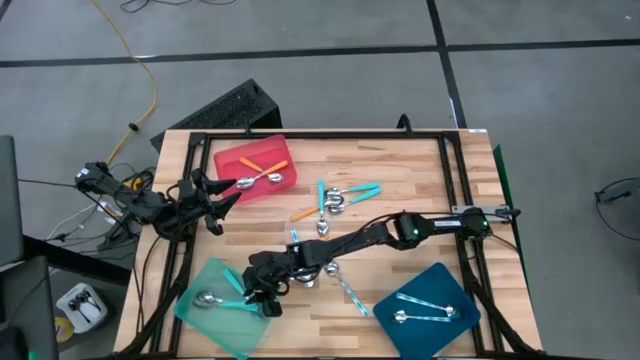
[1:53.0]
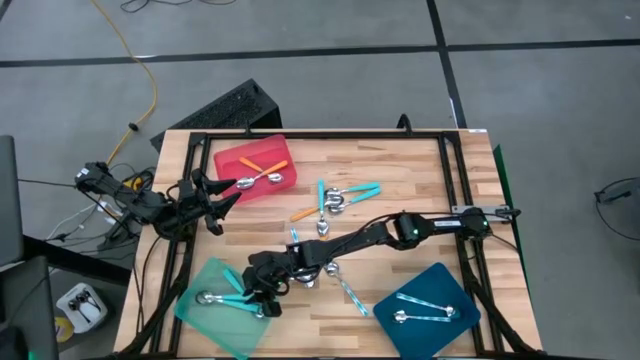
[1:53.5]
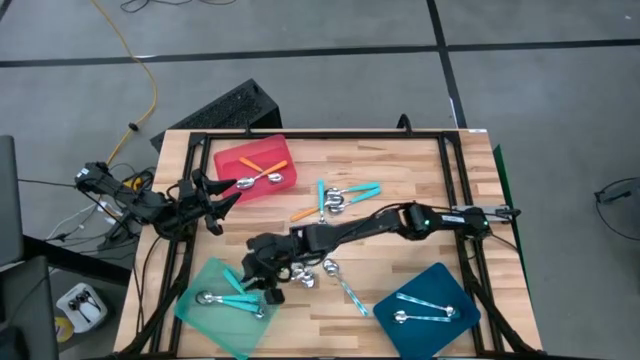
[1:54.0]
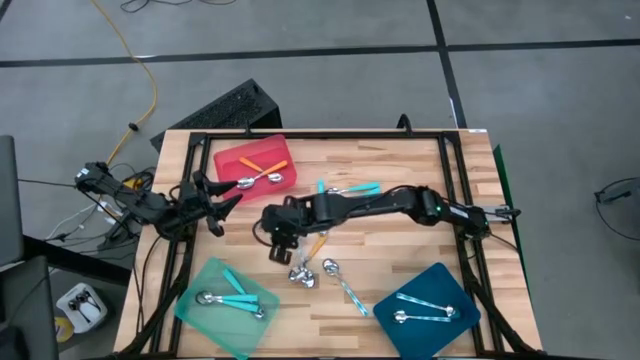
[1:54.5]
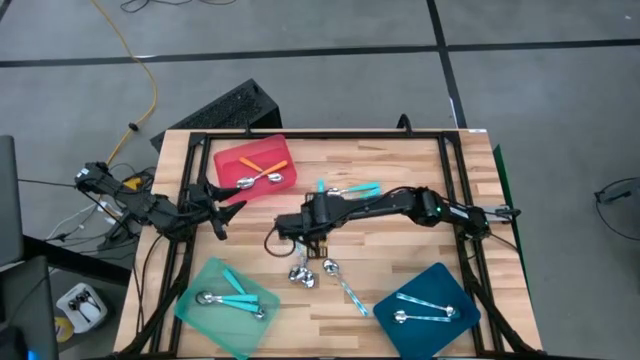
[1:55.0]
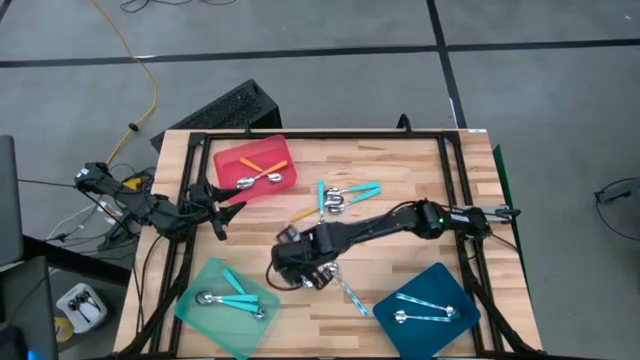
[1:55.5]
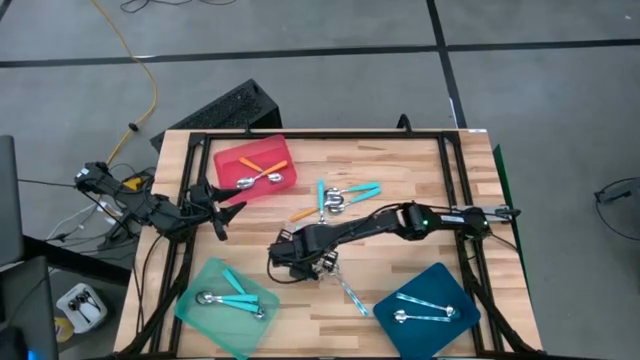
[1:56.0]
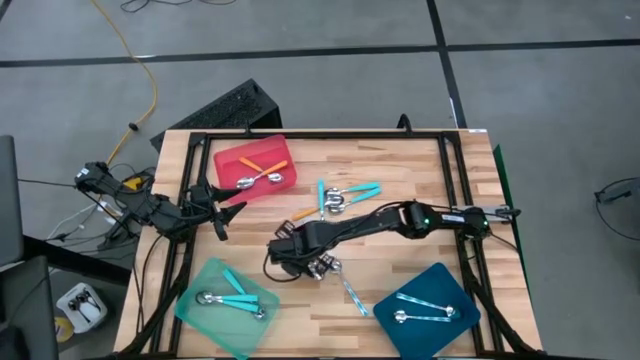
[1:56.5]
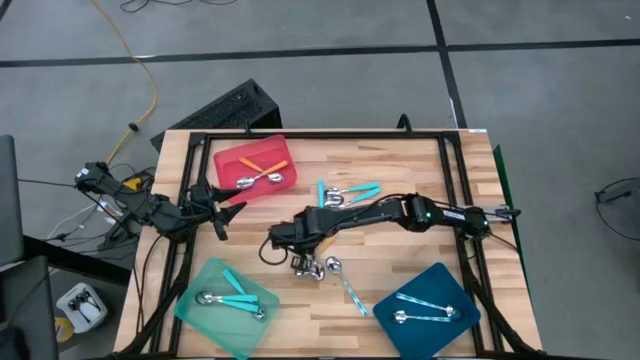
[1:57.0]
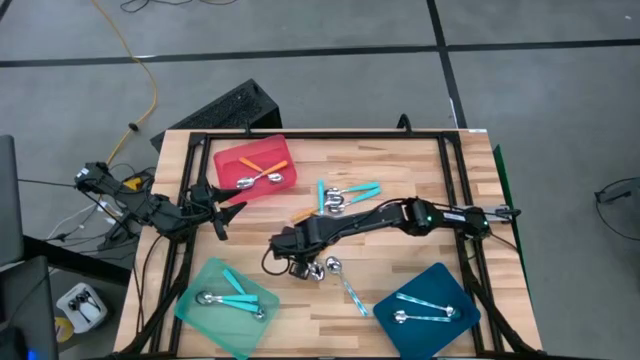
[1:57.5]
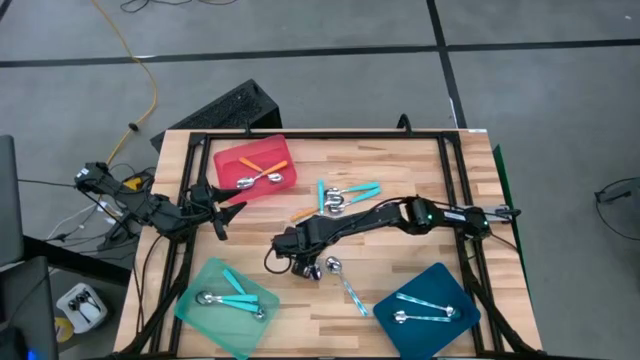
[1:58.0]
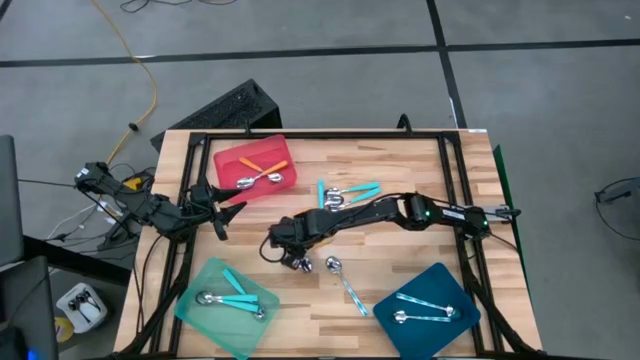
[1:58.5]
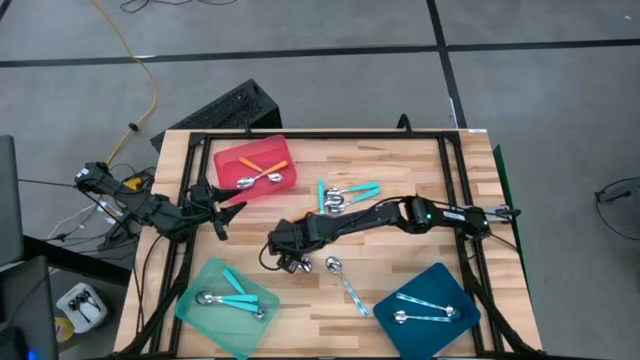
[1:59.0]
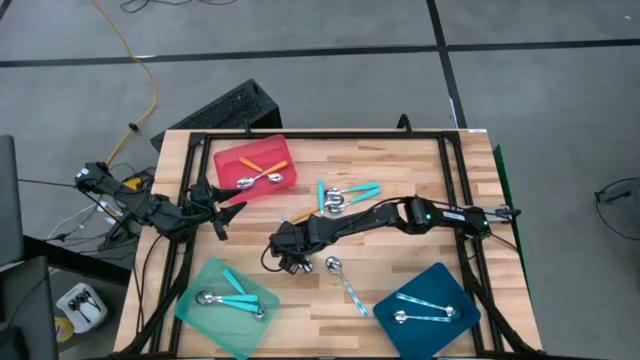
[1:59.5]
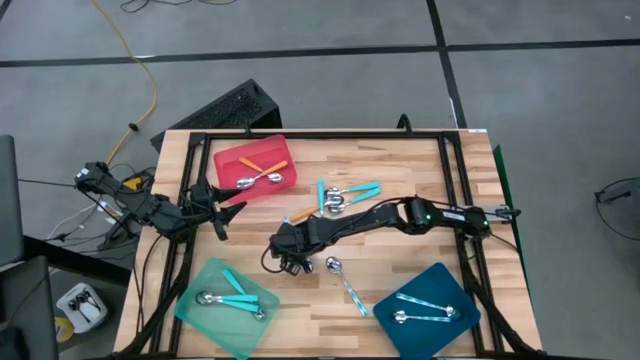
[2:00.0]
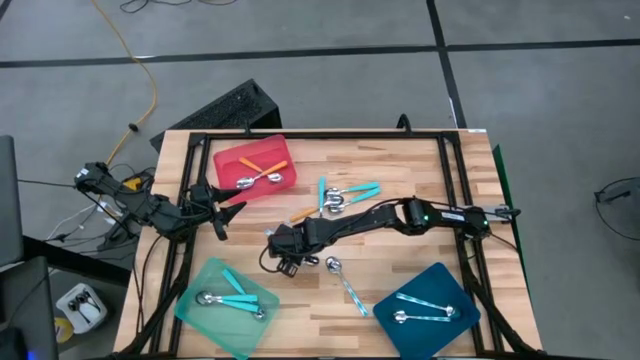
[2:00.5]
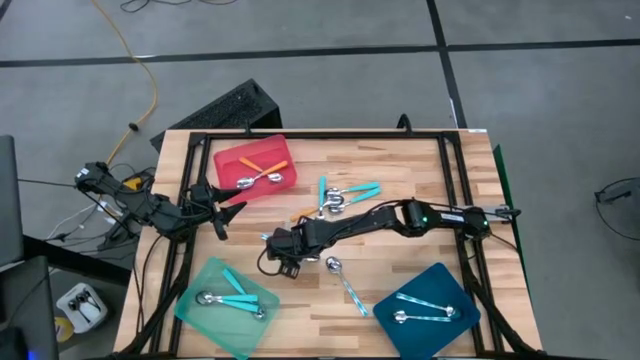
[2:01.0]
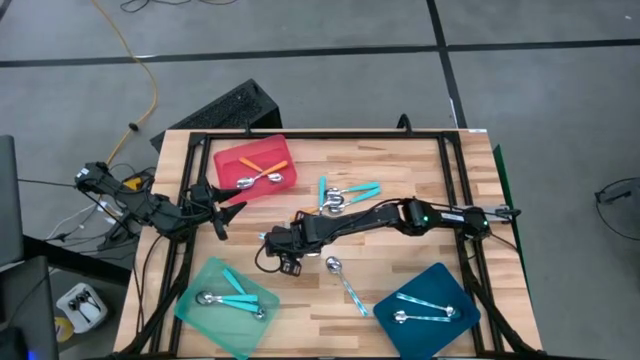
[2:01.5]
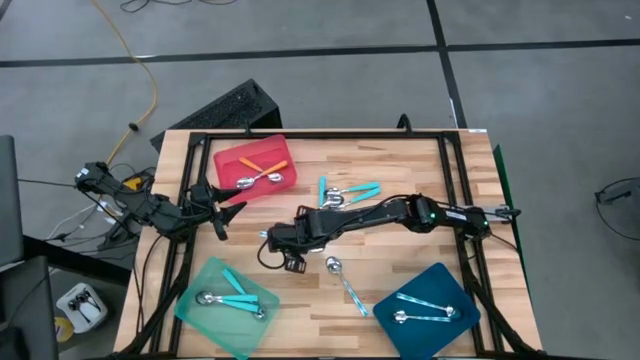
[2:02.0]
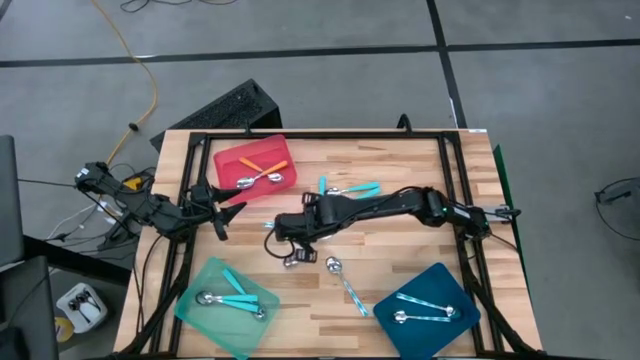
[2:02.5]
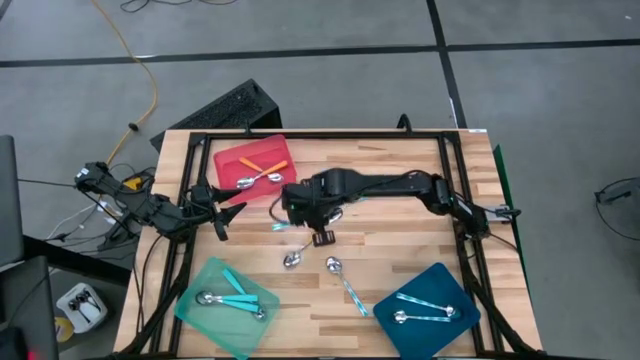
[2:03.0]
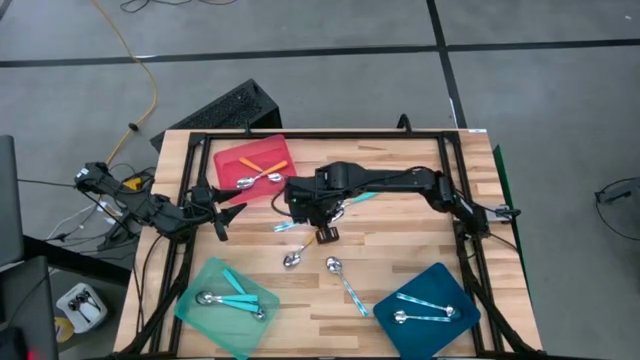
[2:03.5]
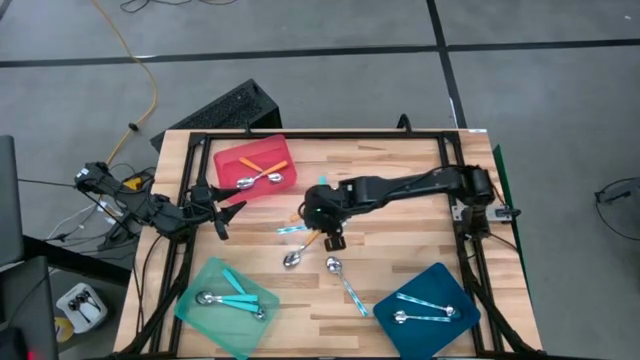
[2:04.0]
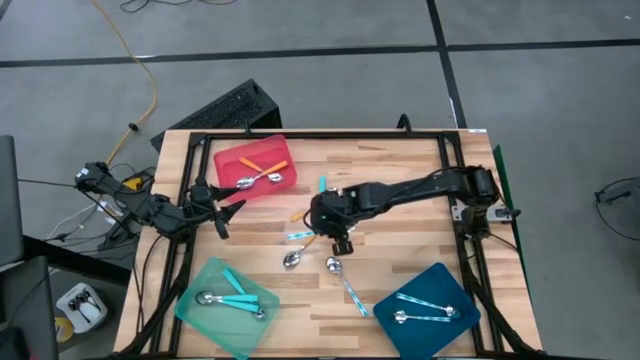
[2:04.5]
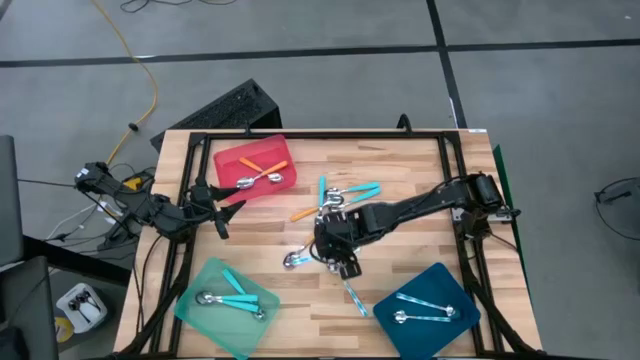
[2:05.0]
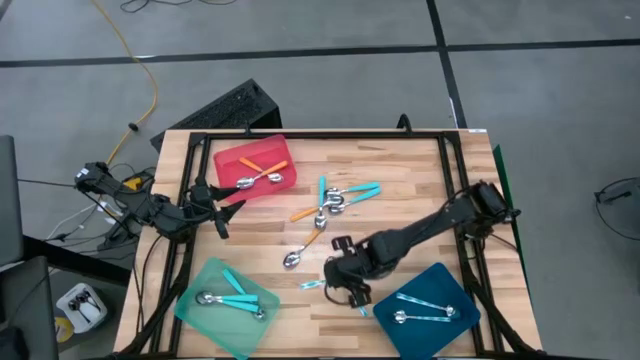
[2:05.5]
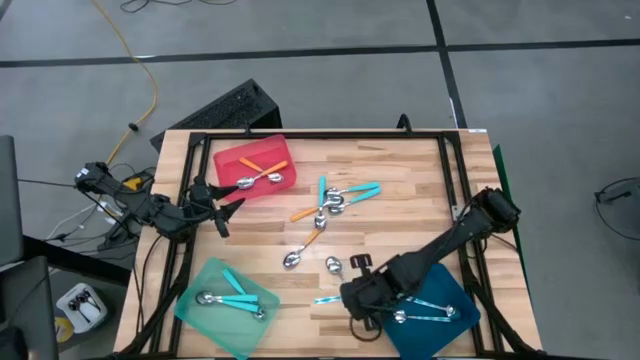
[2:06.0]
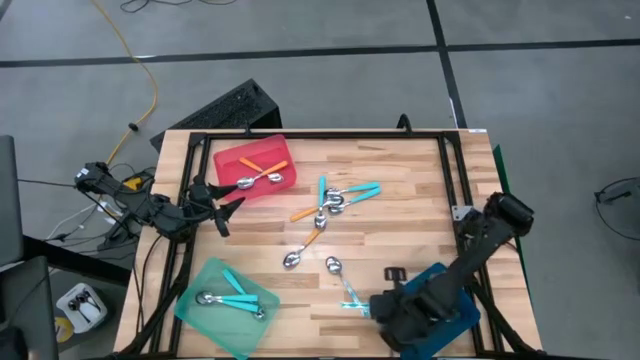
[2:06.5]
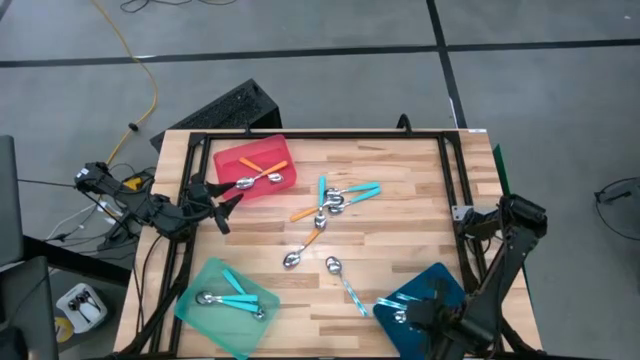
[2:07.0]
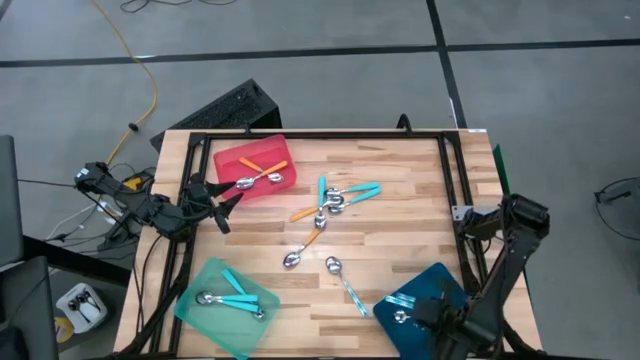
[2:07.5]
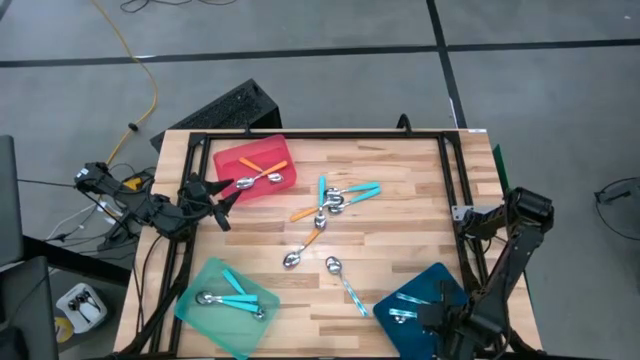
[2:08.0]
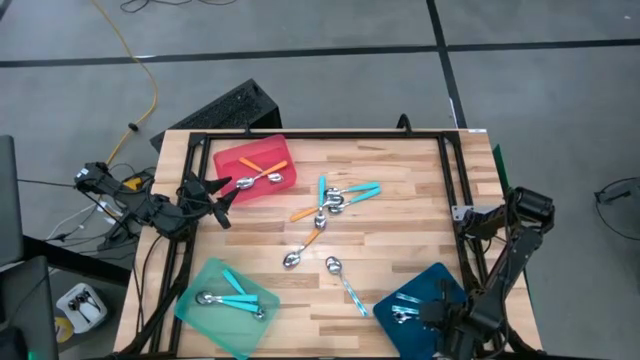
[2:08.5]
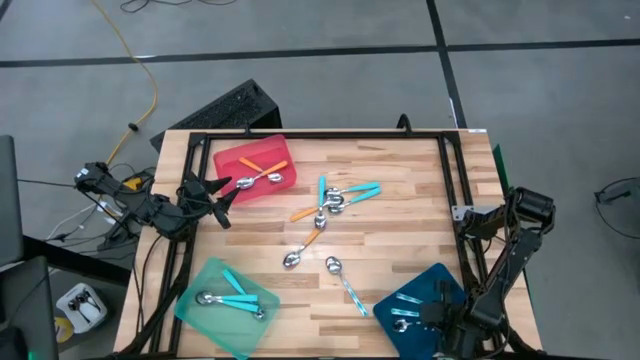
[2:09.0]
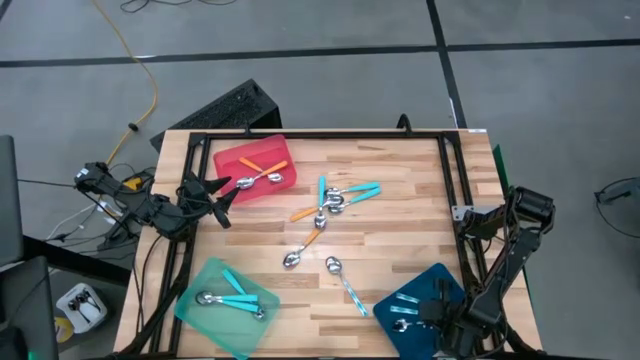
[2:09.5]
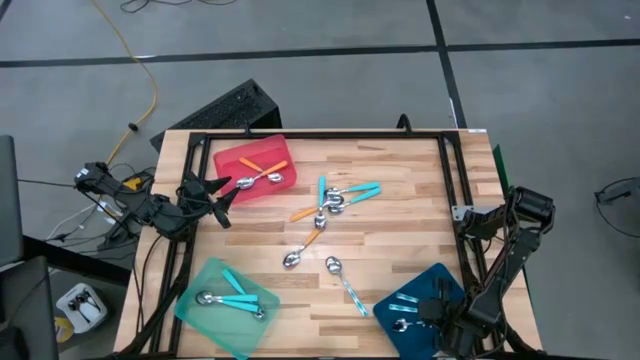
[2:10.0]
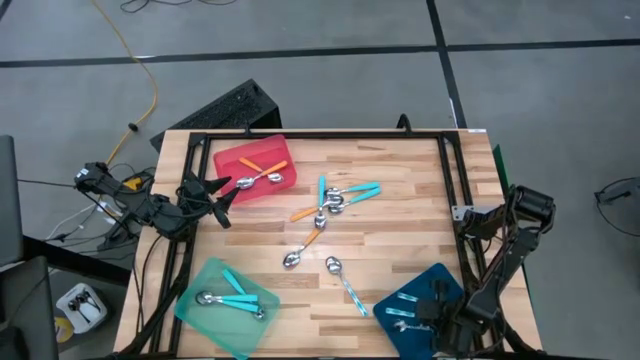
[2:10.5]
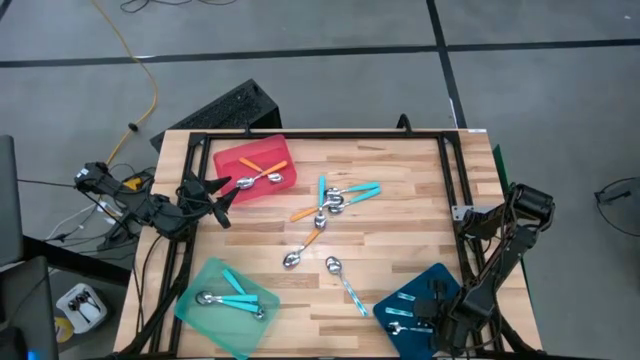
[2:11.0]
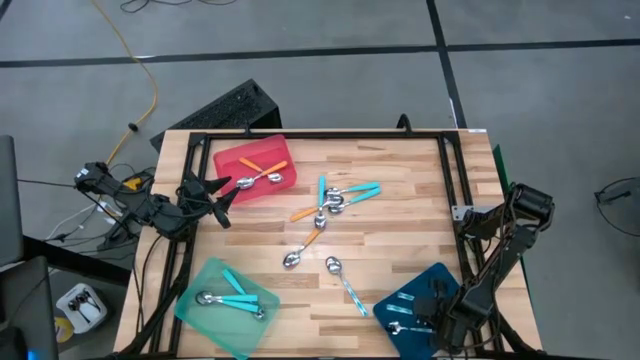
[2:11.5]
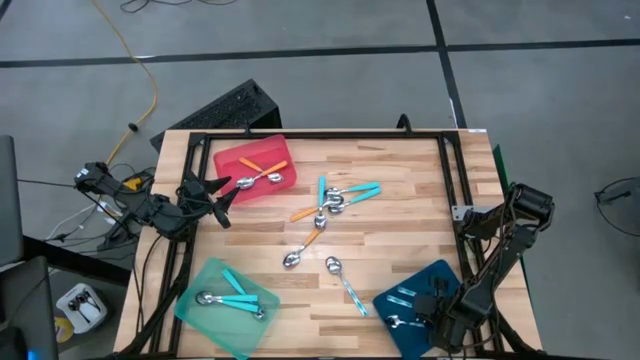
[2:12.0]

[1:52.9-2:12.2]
Task: Sort silverware by color (type)
Put the blue patterned spoon into the blue bin

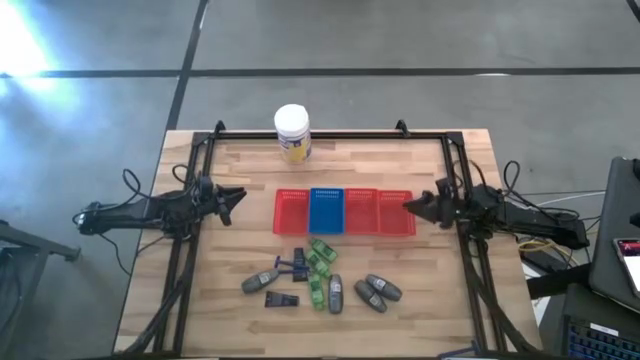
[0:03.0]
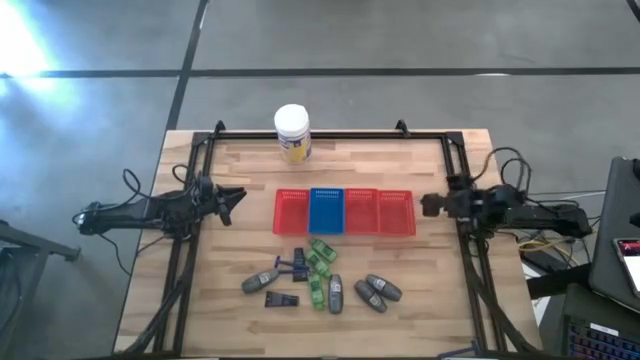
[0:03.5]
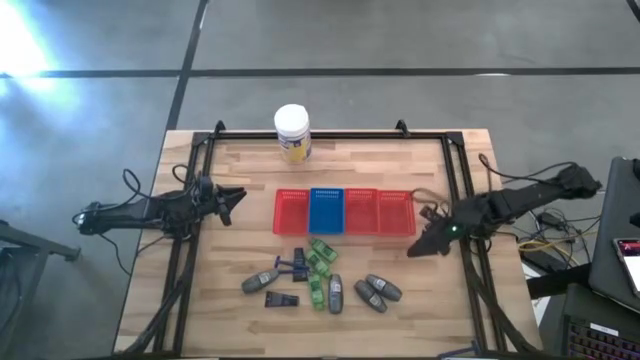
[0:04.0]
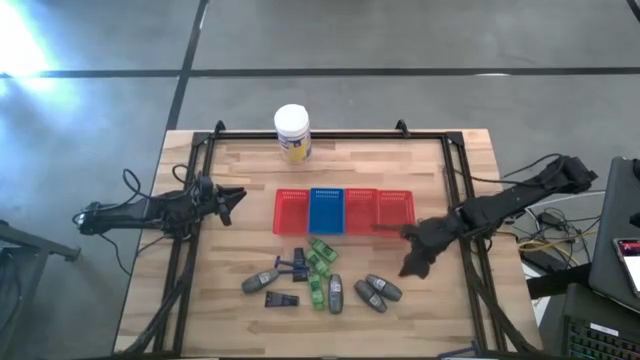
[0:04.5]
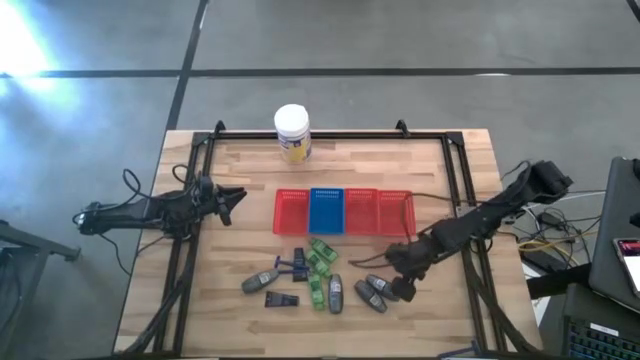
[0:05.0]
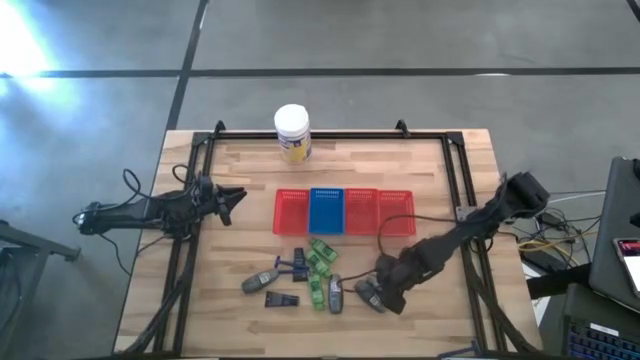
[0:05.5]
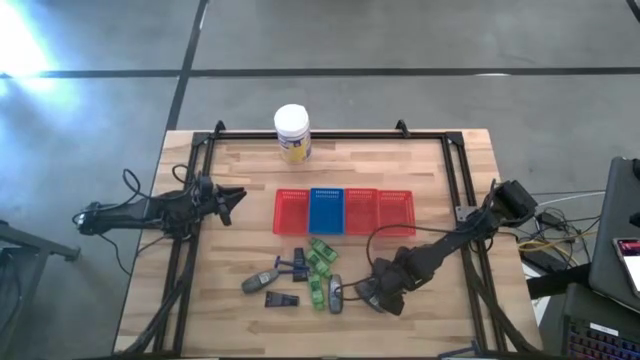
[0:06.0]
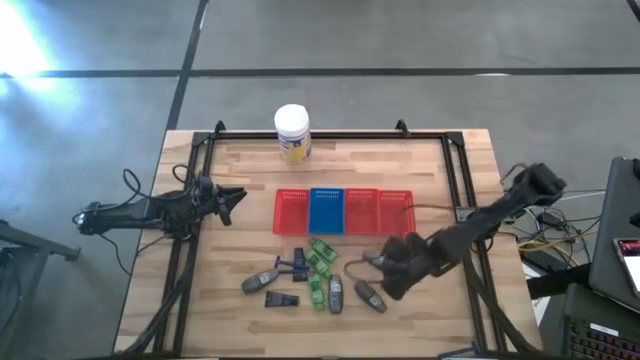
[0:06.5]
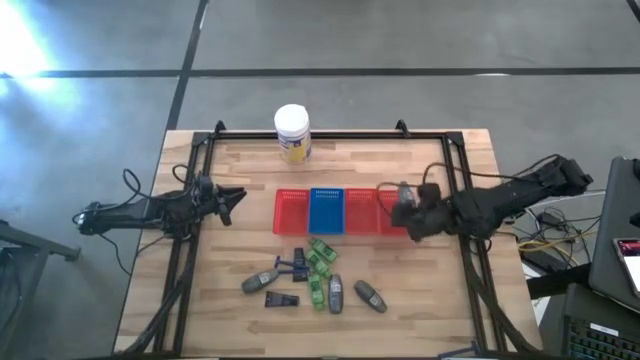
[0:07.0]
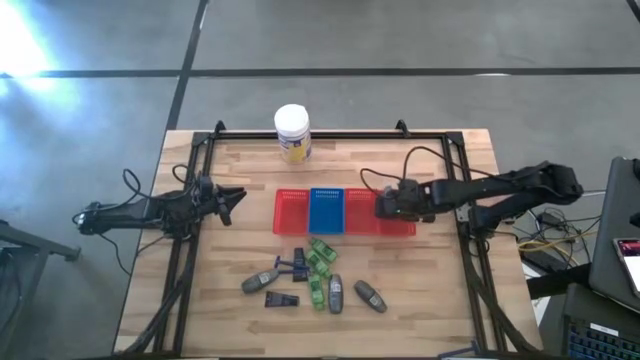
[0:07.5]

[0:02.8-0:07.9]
Task: Pick & Place Travel size toiletries
Put the deodorant into the right red bin
